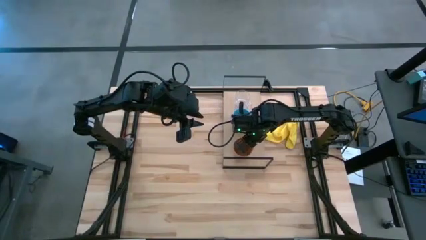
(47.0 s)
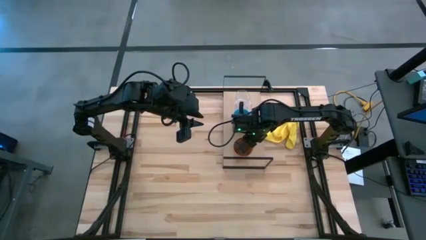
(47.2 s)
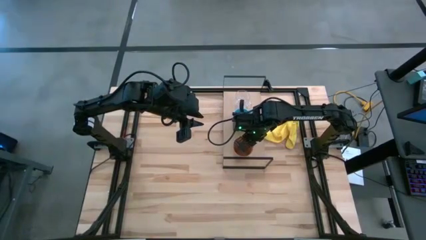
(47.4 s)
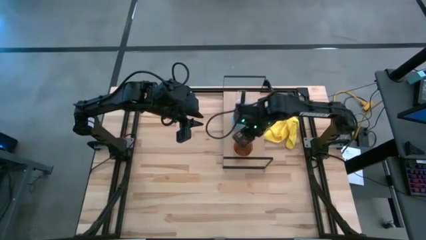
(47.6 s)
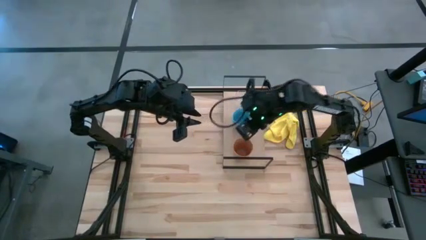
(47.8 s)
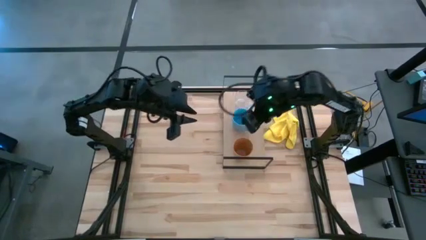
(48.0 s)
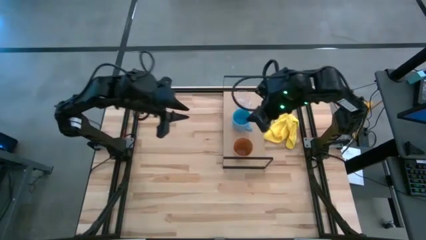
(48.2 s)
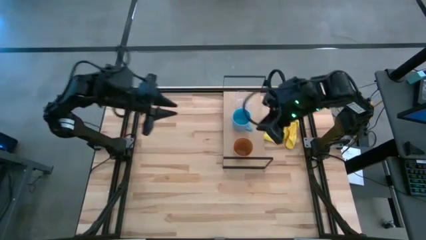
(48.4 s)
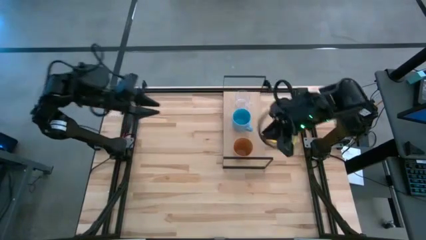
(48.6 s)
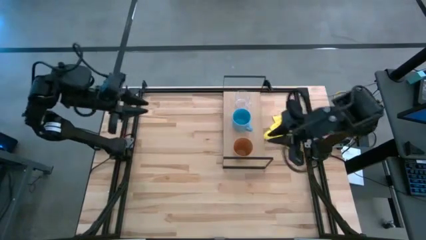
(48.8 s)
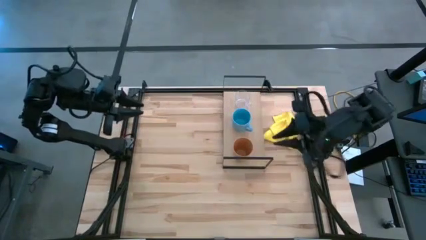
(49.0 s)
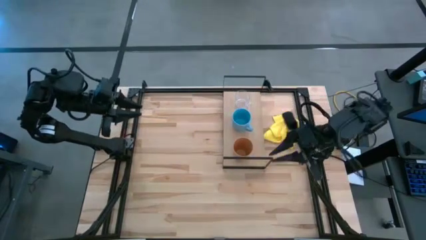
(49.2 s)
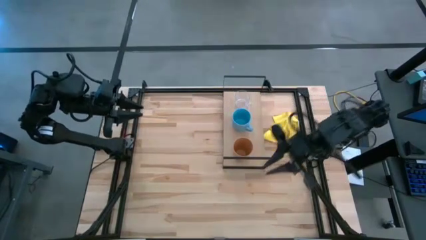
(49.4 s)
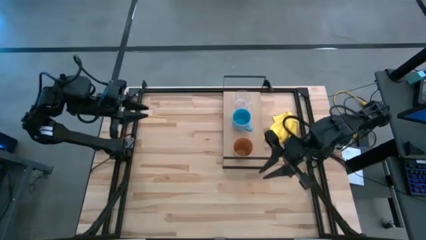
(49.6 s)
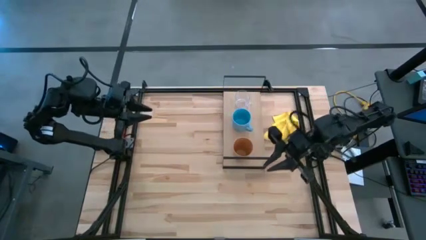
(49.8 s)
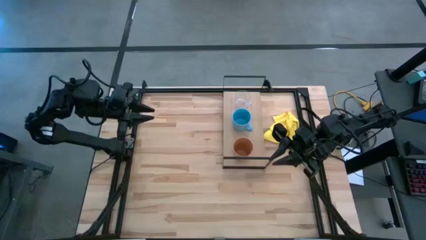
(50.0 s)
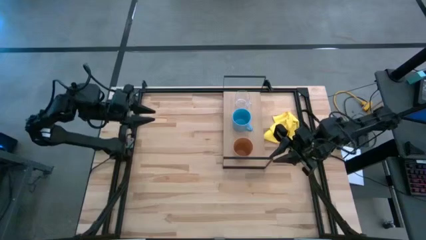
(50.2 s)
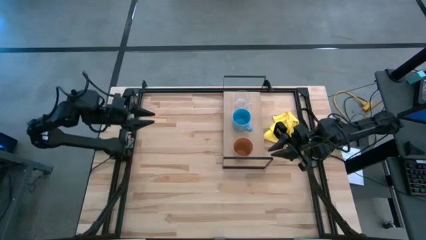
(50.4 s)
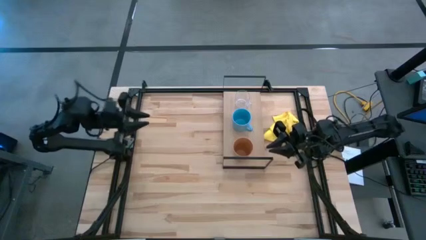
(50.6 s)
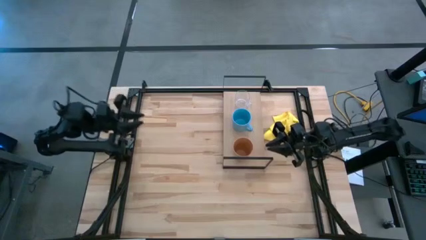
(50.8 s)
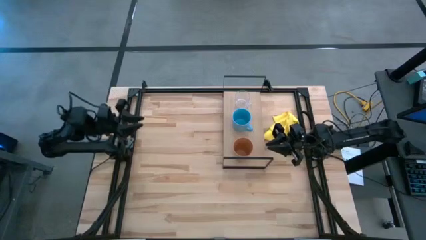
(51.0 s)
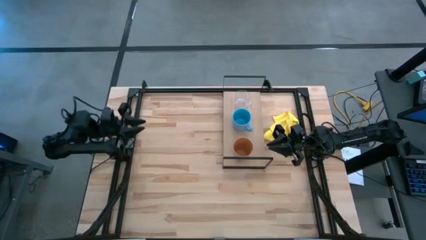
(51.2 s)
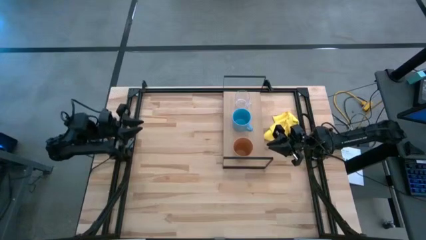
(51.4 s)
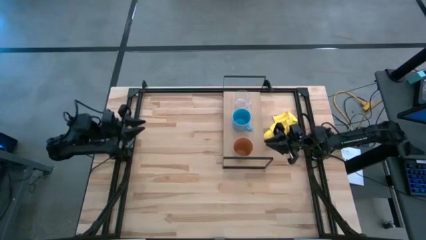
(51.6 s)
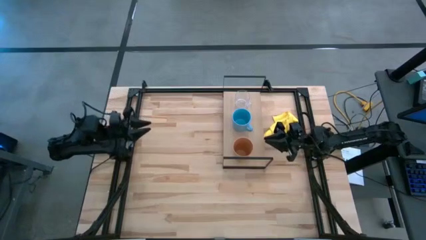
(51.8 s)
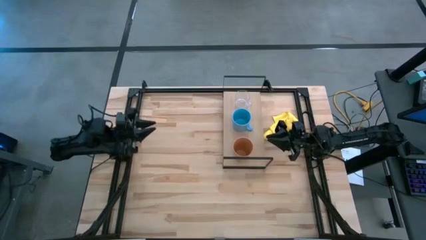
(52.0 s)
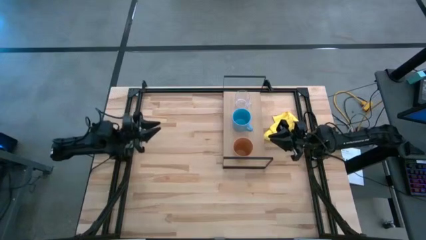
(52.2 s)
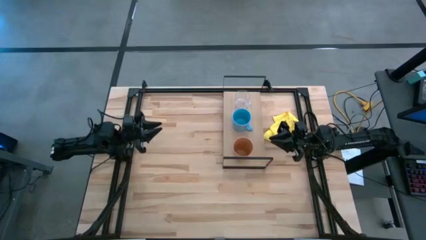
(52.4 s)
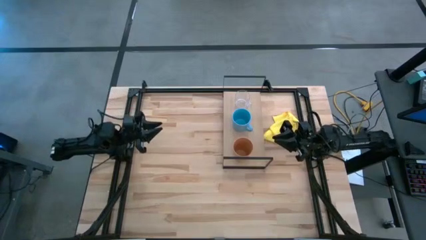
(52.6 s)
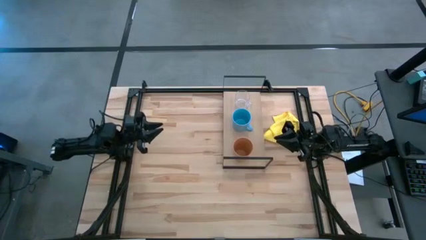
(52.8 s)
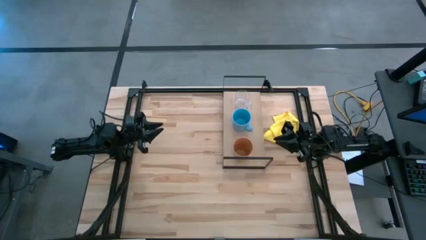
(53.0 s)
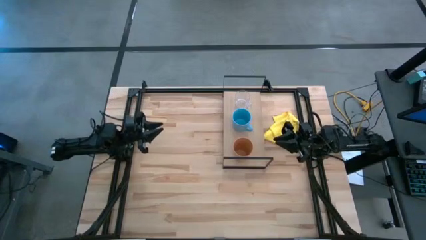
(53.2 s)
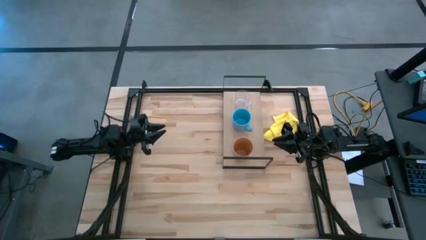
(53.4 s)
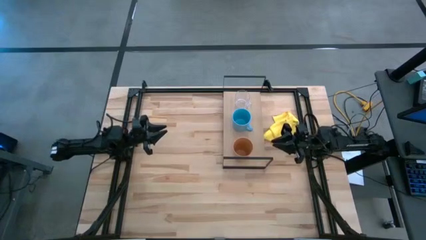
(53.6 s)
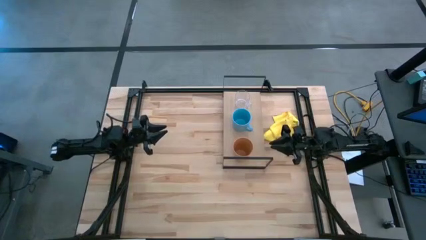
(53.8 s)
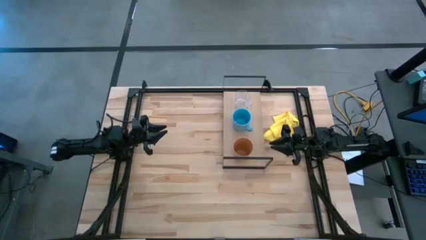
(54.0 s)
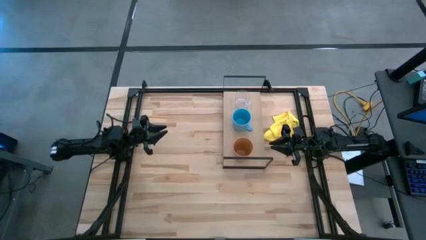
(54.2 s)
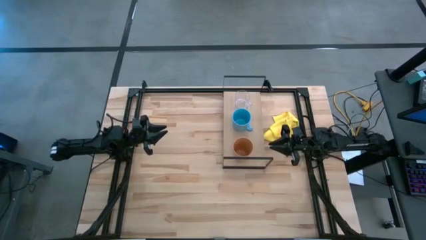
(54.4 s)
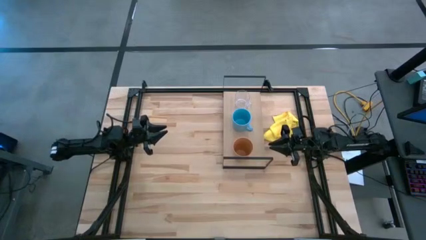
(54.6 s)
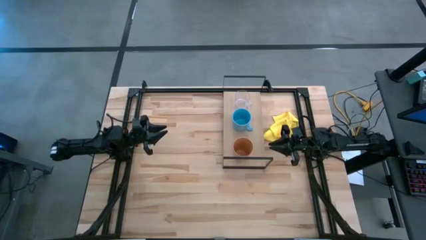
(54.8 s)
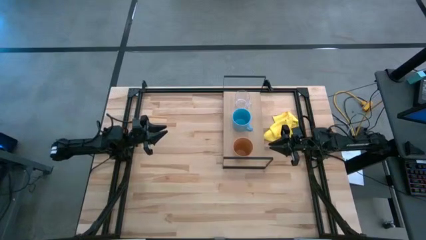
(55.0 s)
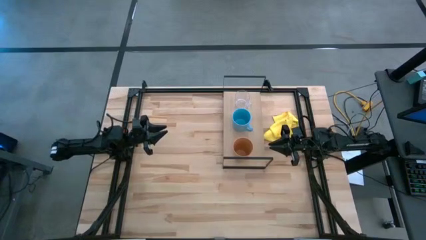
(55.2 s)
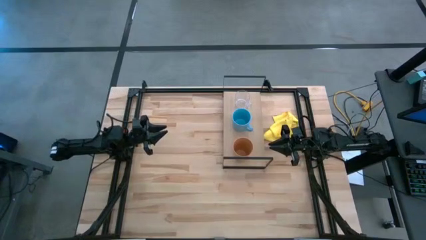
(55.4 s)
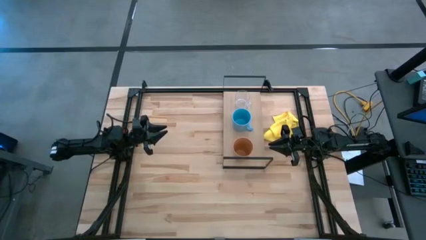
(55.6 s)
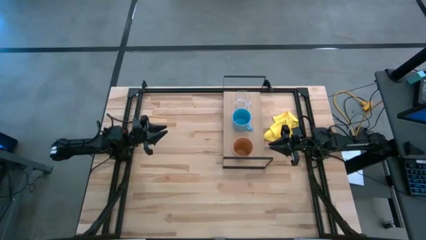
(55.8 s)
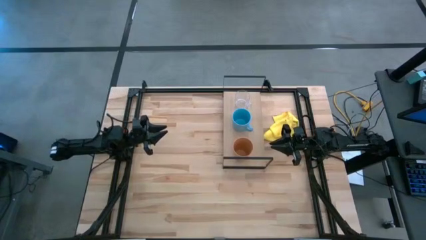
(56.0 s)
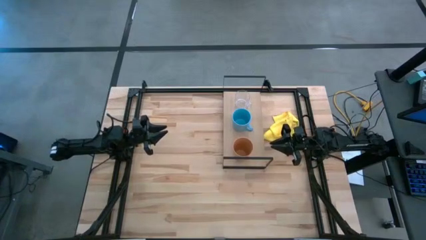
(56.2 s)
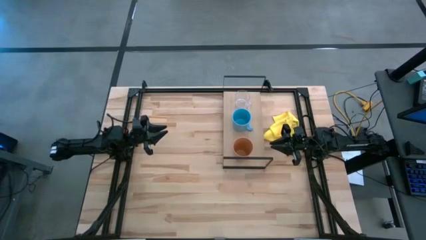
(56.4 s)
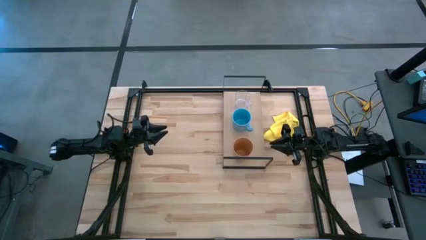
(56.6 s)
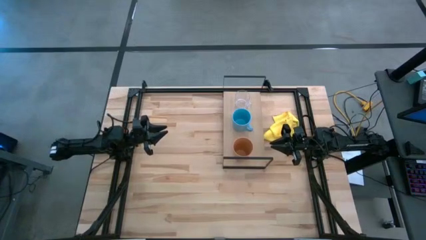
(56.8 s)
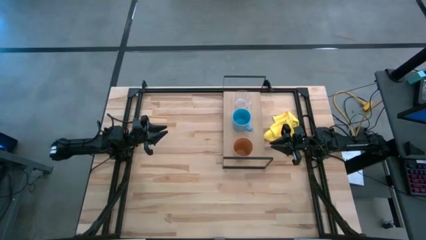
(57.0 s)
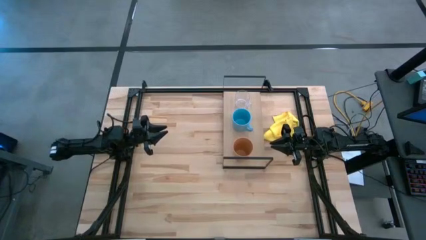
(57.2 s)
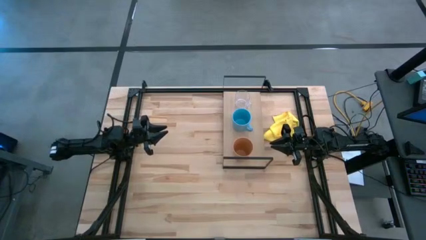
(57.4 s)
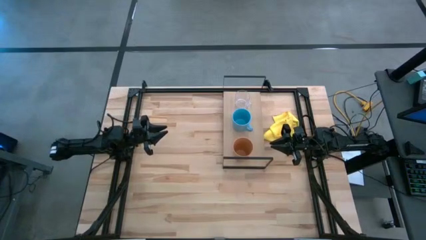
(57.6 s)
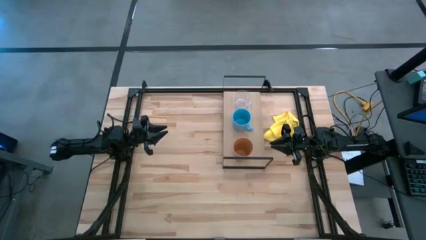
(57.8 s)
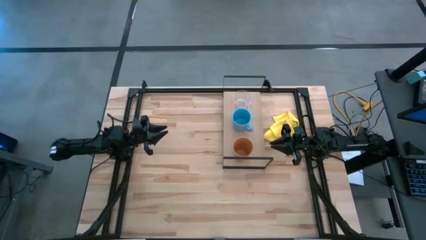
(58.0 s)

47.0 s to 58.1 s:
Task: Stack small to large cups/mugs on shelf
Return to Home Position
